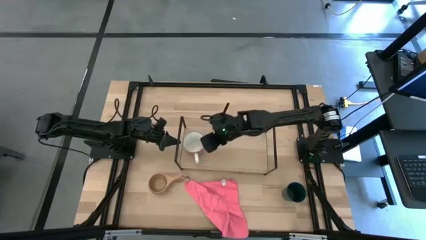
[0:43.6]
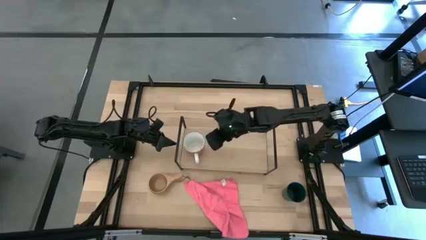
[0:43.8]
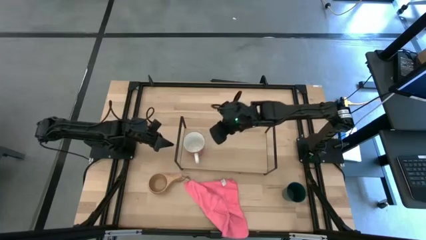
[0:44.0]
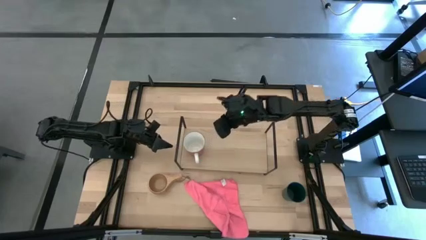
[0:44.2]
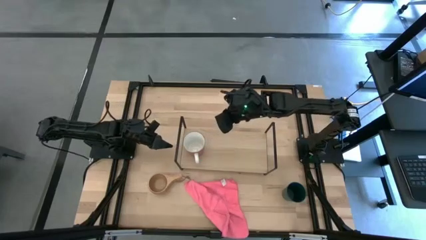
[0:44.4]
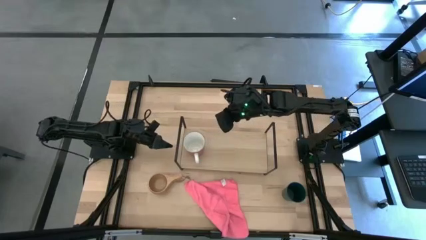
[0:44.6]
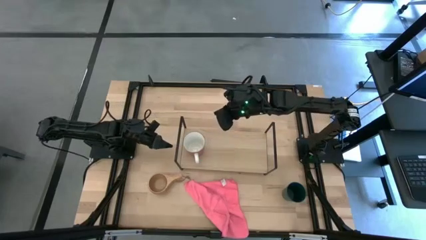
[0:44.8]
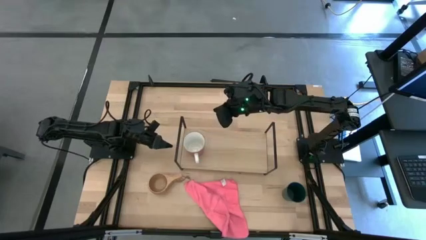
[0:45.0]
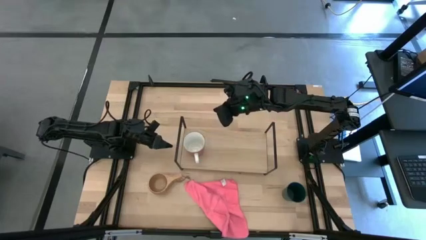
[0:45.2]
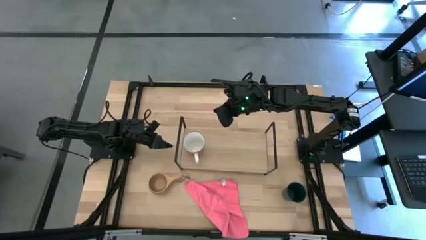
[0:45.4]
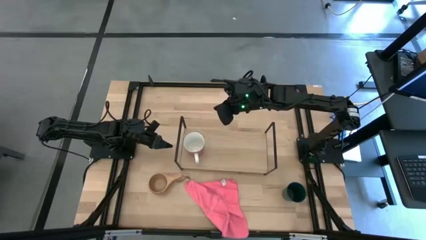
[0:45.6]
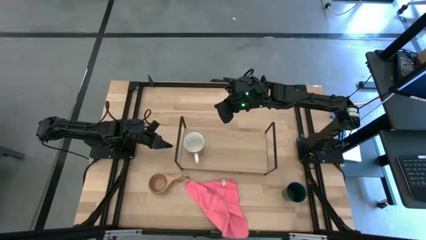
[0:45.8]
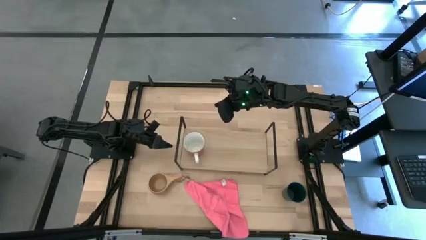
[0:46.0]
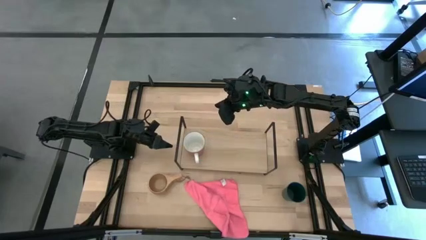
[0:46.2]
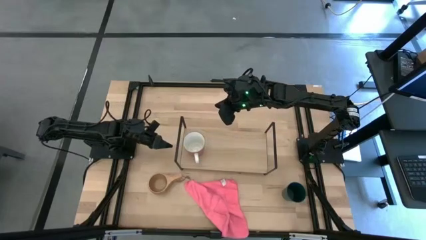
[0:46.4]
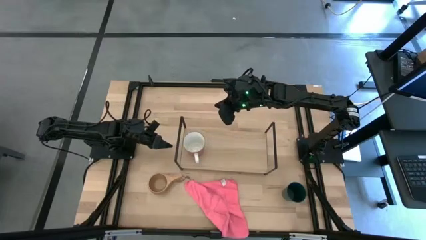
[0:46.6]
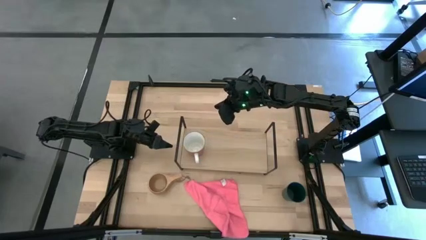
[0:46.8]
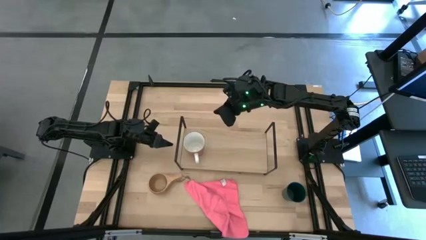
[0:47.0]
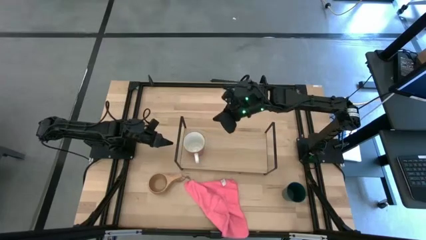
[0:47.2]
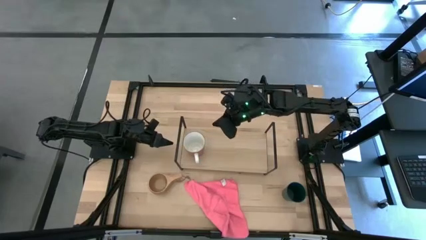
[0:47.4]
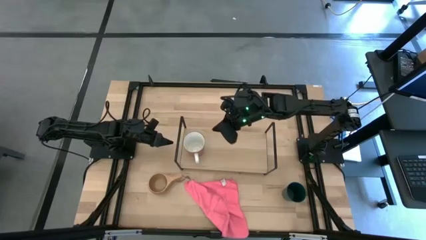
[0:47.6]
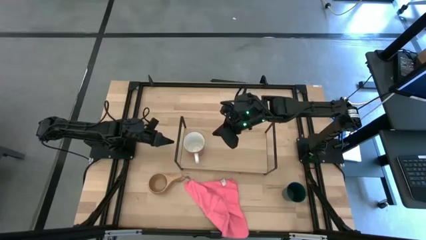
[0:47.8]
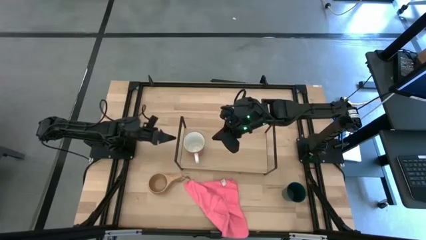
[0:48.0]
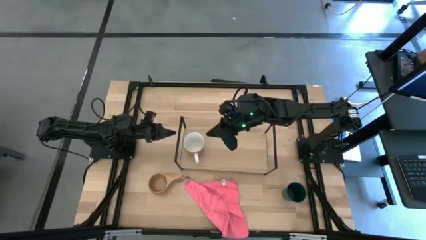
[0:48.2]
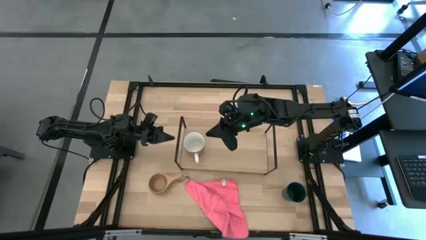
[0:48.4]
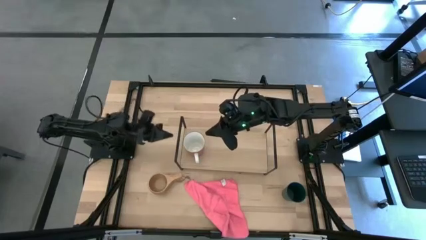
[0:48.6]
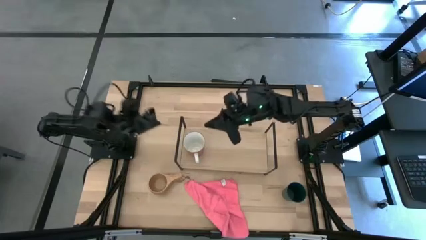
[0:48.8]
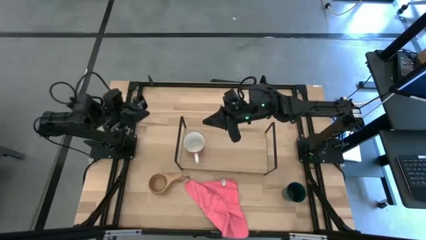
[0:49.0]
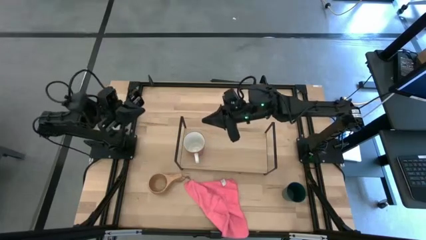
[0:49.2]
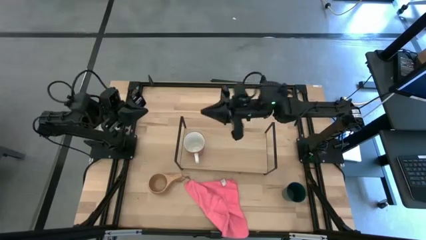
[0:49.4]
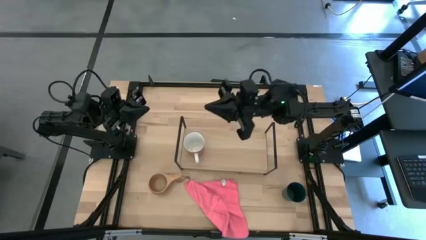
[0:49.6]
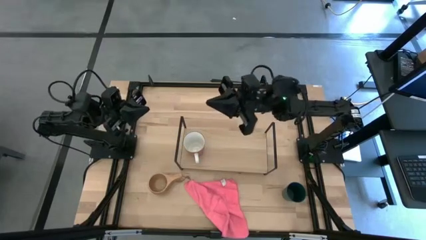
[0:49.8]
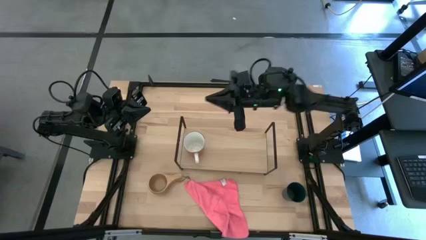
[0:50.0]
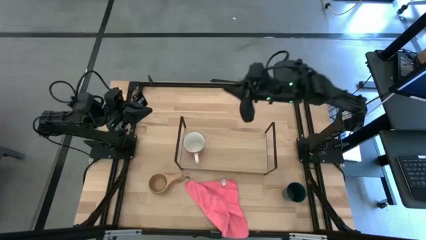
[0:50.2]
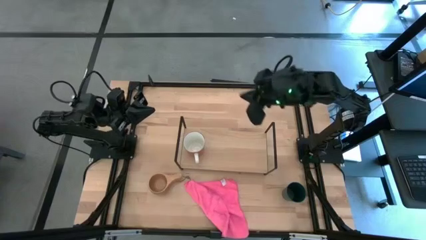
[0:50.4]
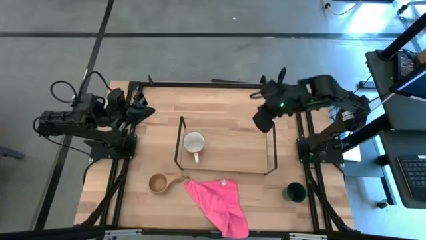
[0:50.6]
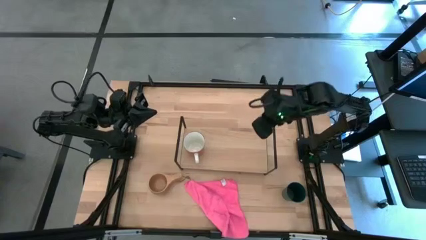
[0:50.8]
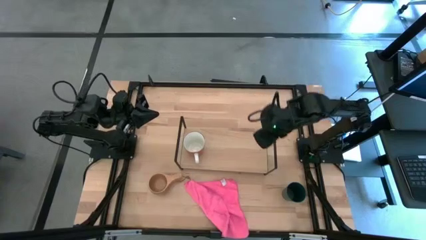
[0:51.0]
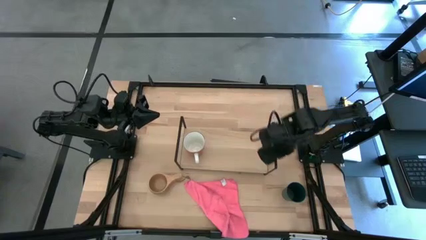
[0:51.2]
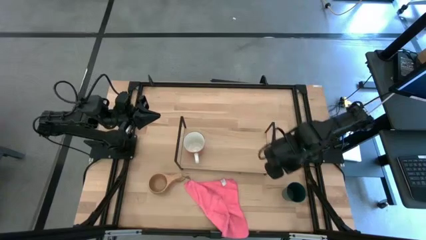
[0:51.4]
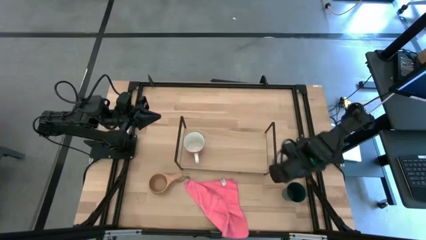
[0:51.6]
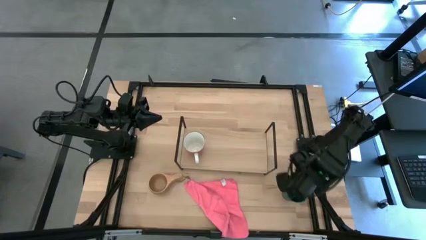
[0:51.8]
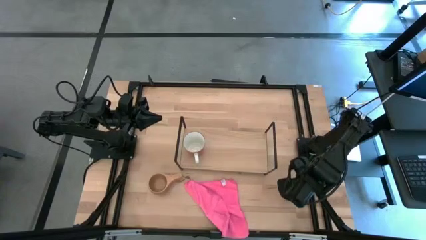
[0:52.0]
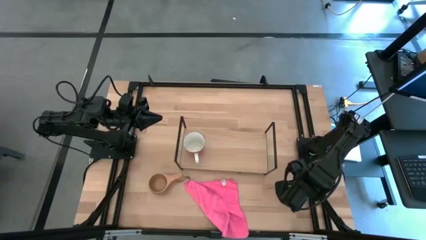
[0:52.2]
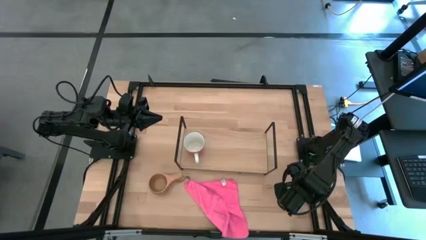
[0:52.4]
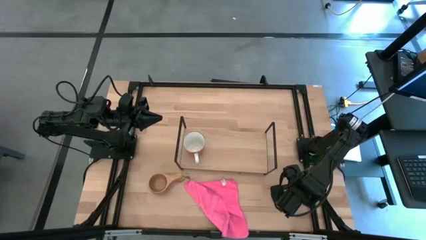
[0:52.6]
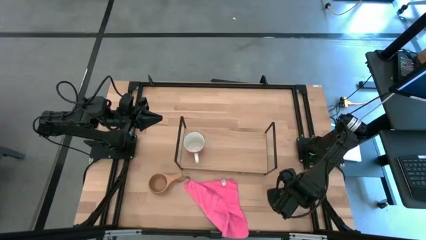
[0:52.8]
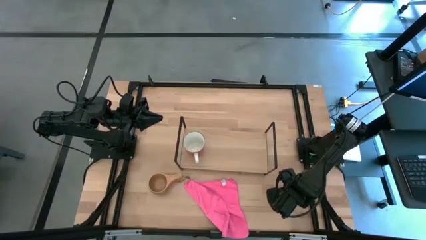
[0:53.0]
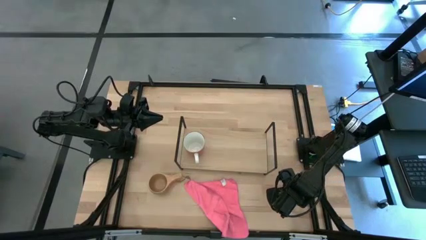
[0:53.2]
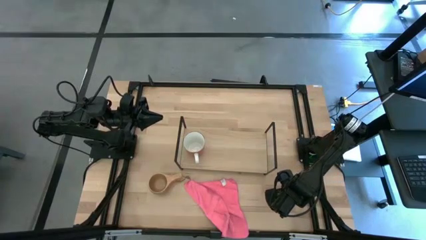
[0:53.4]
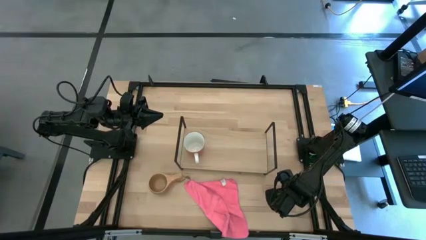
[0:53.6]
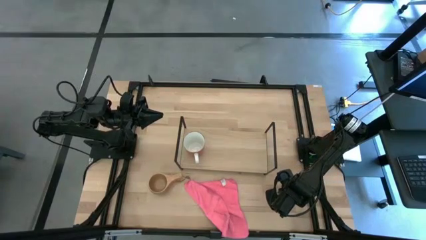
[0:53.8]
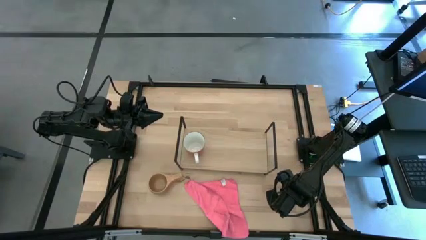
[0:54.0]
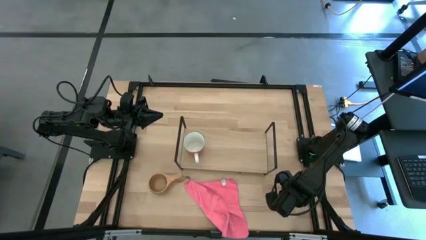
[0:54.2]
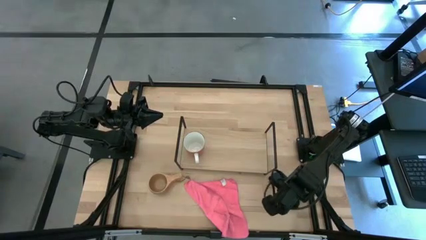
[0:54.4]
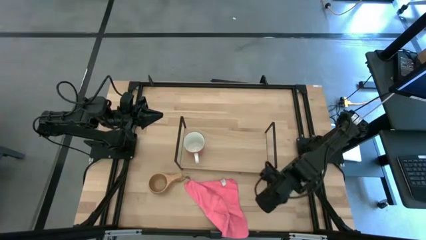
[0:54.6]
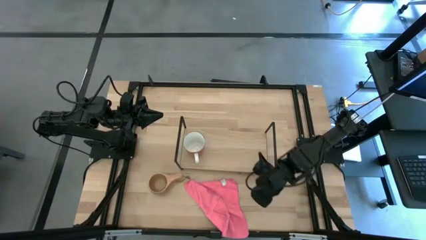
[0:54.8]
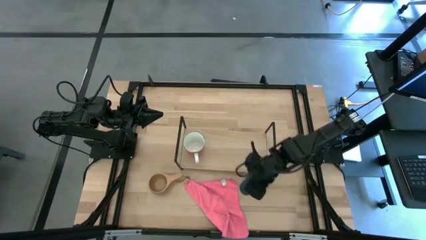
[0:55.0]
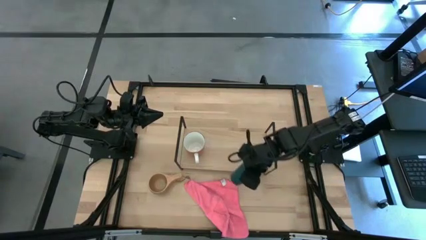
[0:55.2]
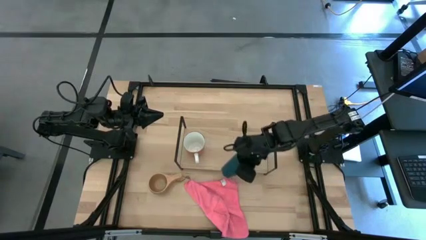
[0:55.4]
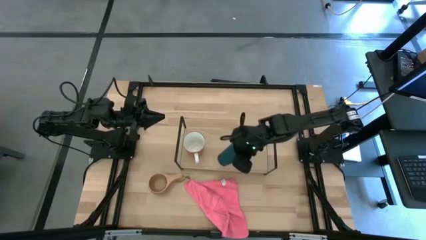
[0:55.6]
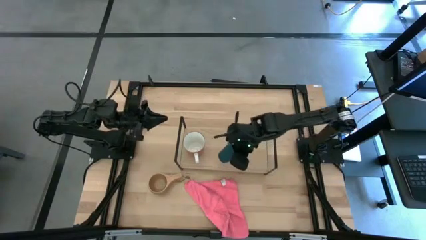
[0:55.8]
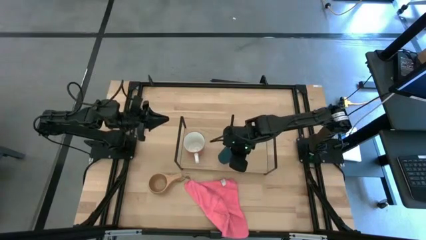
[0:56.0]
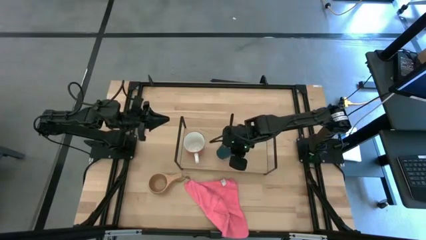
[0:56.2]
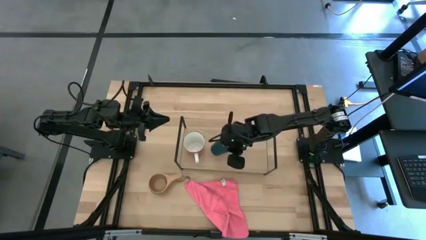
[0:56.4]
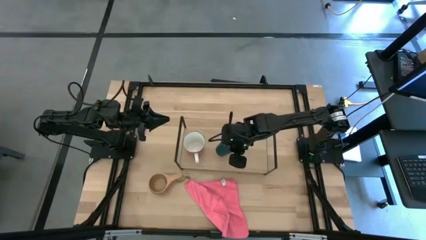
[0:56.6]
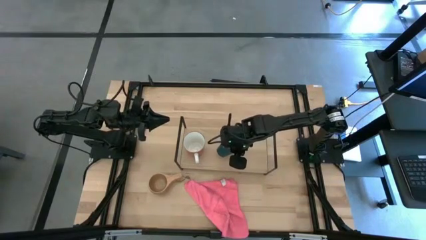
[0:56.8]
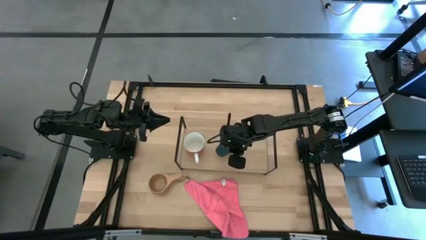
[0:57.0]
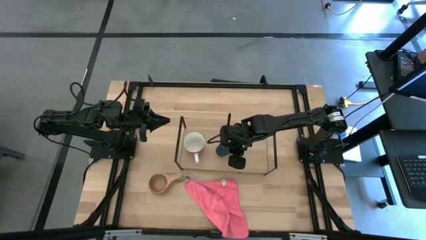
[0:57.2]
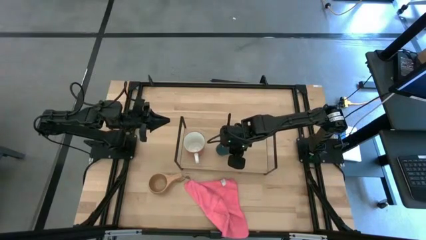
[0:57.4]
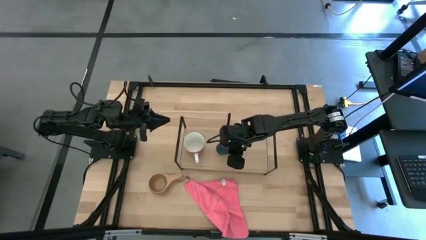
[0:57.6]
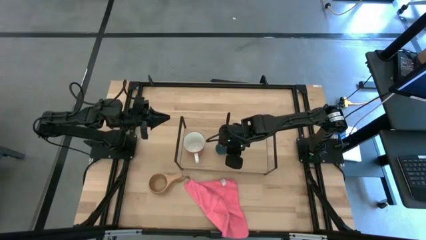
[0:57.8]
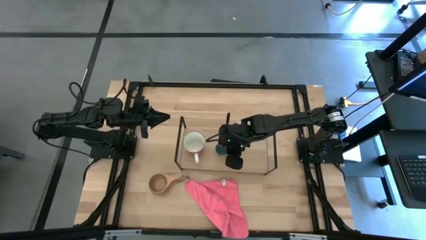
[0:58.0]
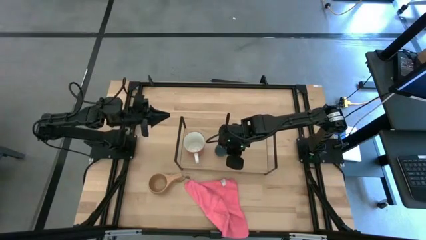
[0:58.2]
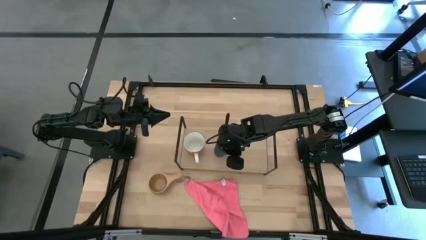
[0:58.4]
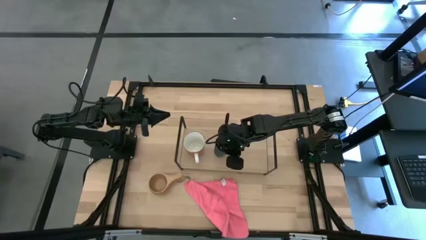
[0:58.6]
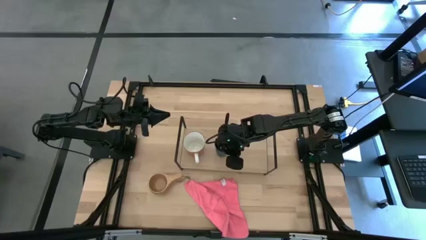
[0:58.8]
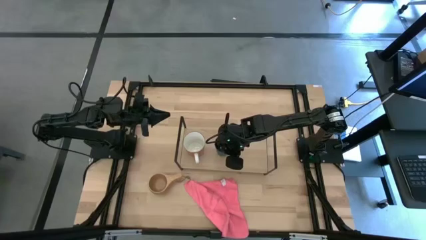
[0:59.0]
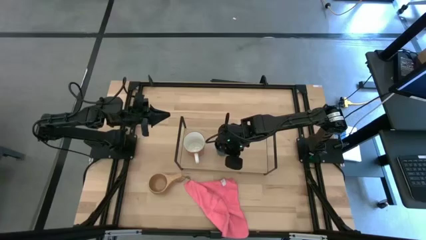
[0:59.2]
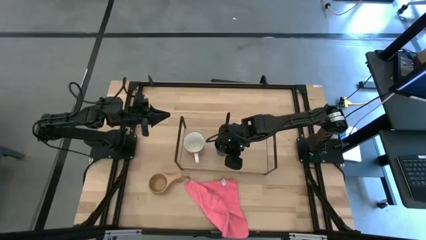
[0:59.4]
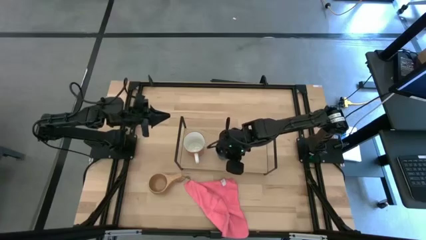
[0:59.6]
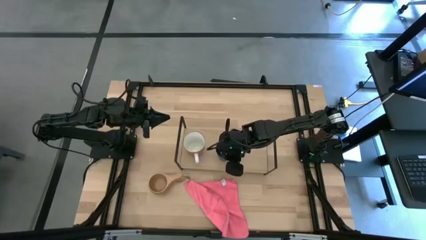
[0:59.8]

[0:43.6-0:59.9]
Task: Stack small to large cups/mugs on shelf
Put blue cup on the shelf

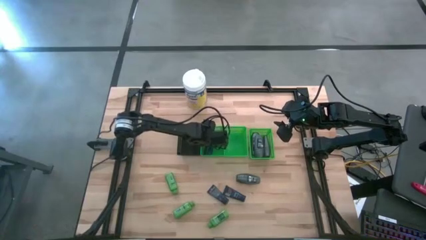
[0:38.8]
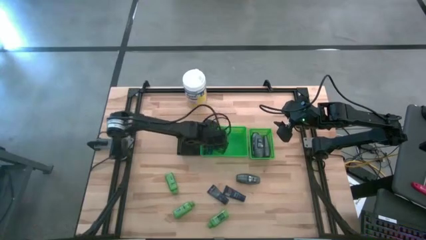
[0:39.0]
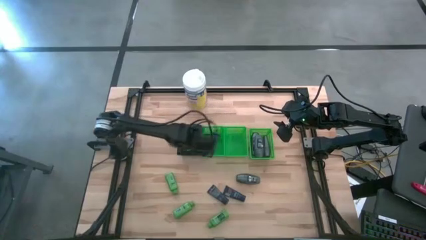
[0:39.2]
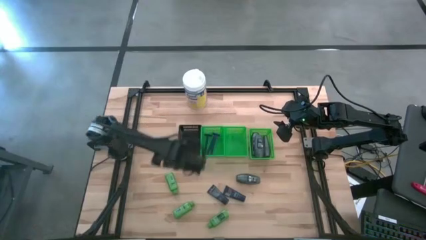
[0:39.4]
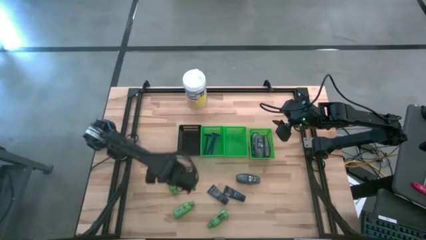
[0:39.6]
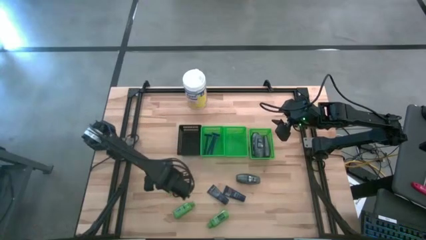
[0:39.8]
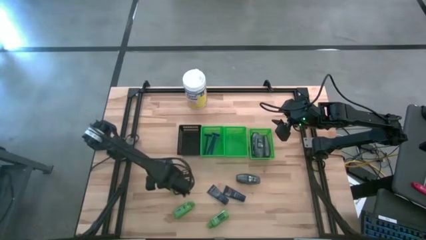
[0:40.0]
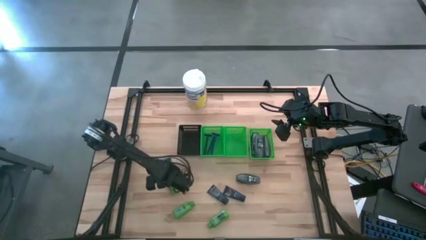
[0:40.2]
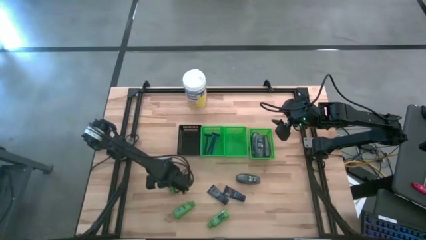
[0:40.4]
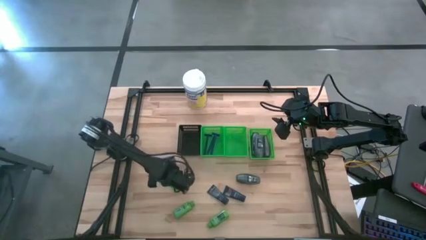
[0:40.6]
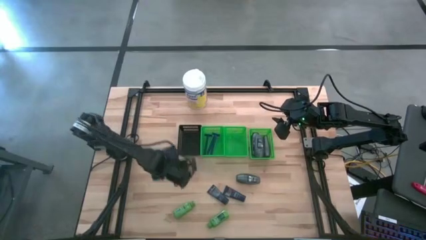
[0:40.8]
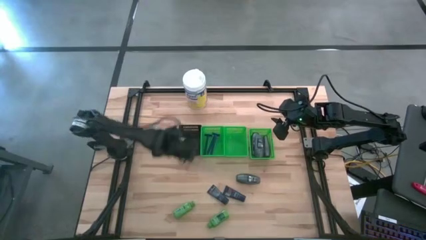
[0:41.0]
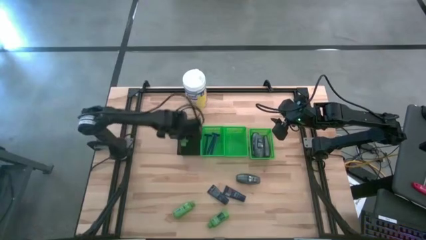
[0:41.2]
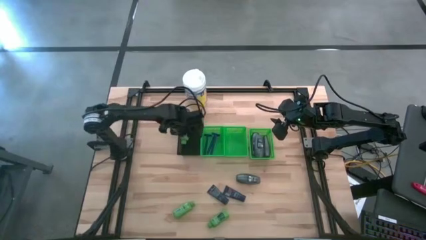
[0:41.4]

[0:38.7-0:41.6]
Task: Pick & Place Travel size toiletries
Put the shampoo into the black bin
